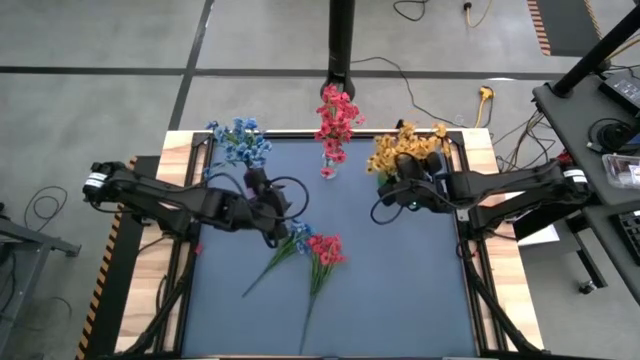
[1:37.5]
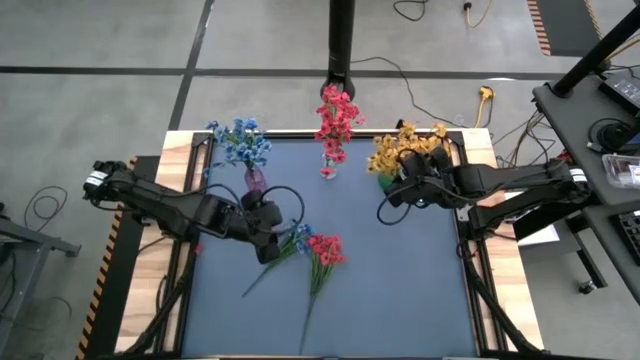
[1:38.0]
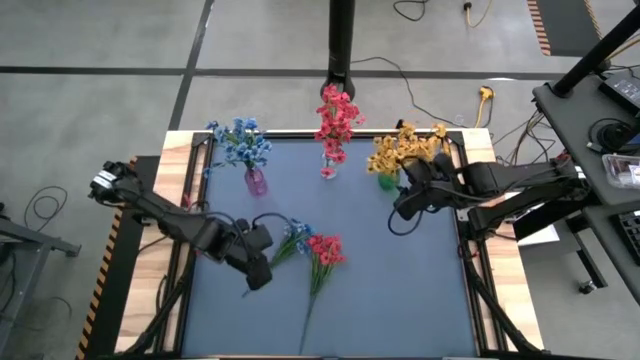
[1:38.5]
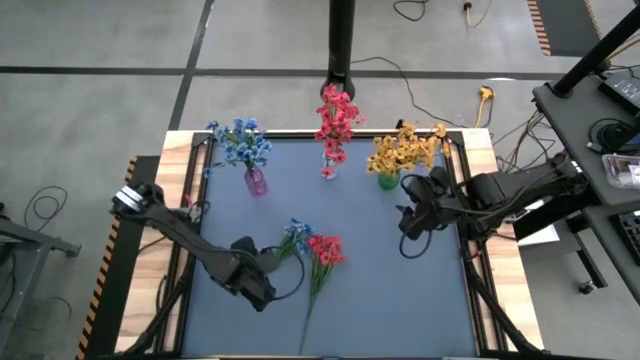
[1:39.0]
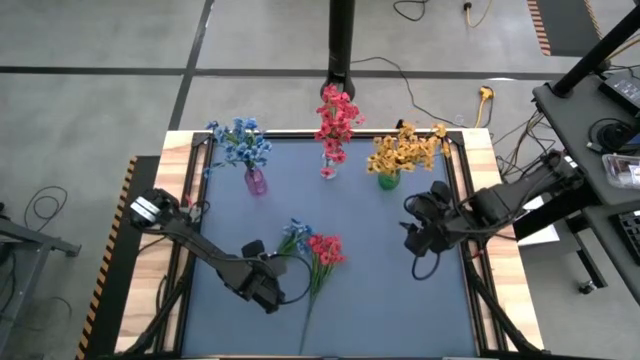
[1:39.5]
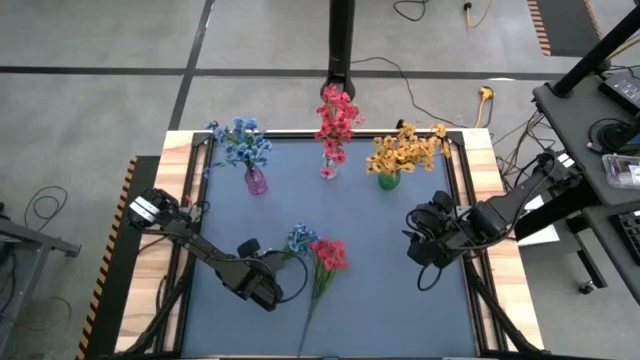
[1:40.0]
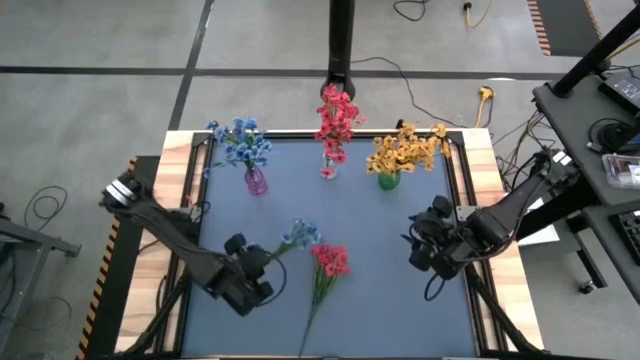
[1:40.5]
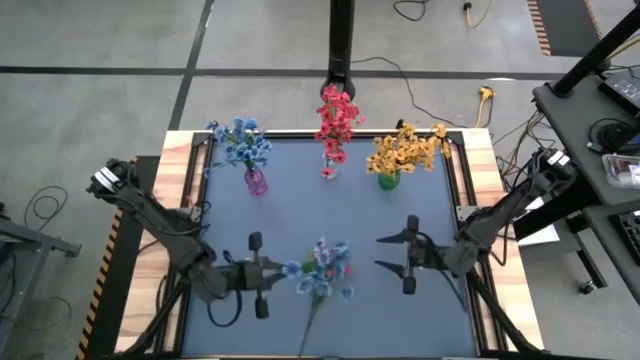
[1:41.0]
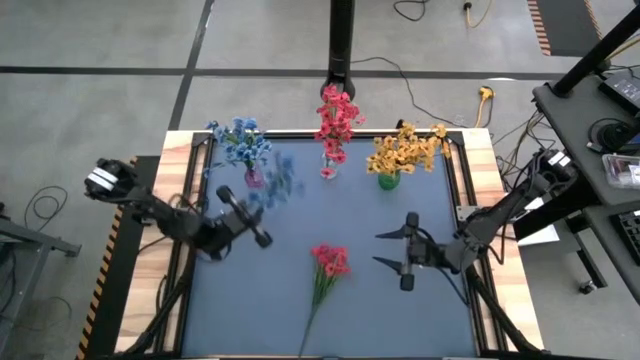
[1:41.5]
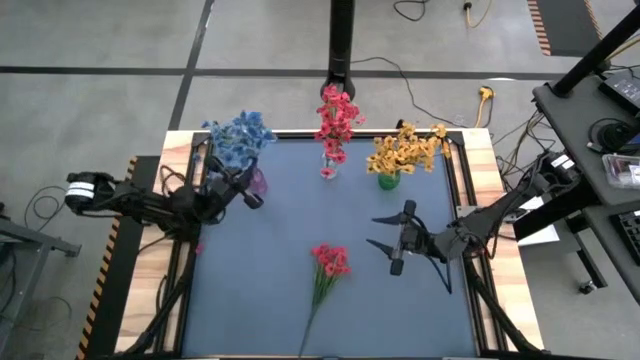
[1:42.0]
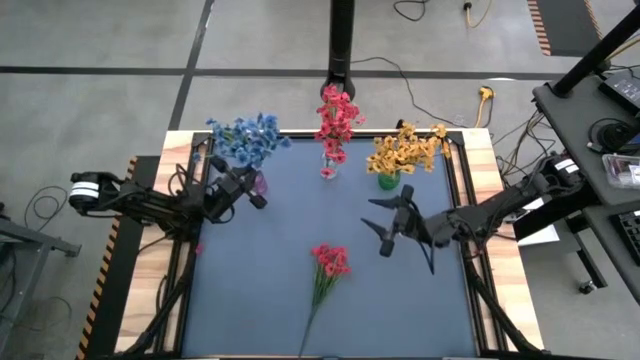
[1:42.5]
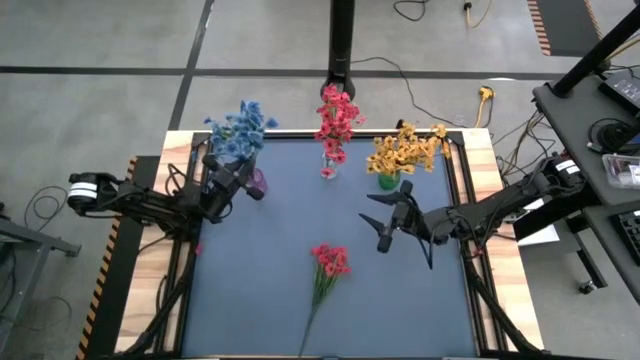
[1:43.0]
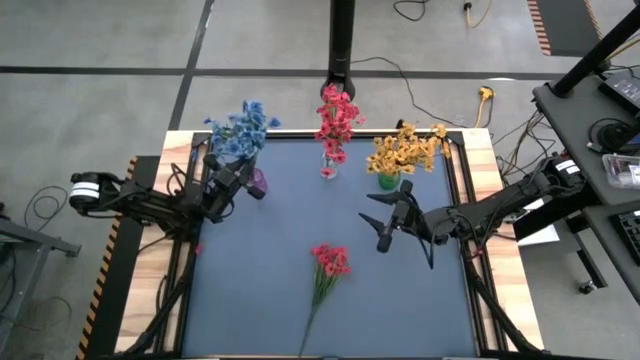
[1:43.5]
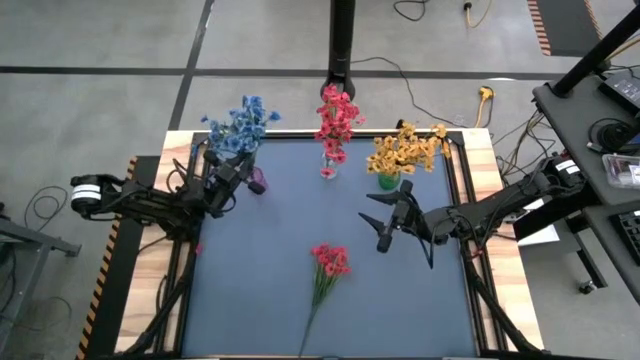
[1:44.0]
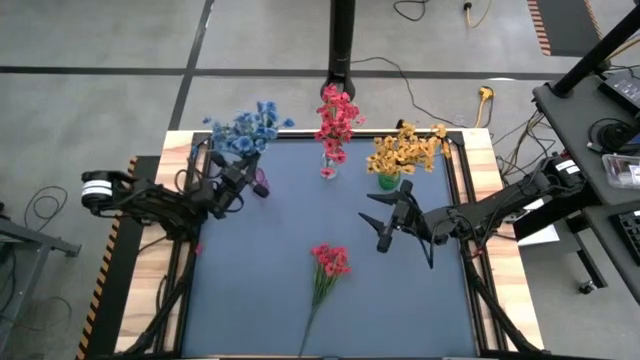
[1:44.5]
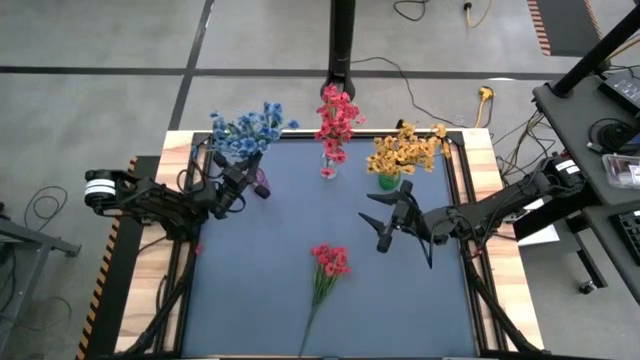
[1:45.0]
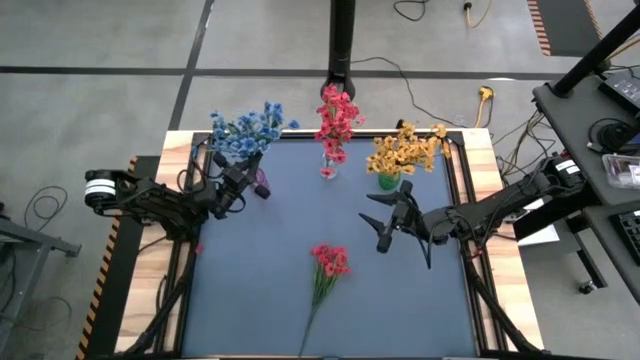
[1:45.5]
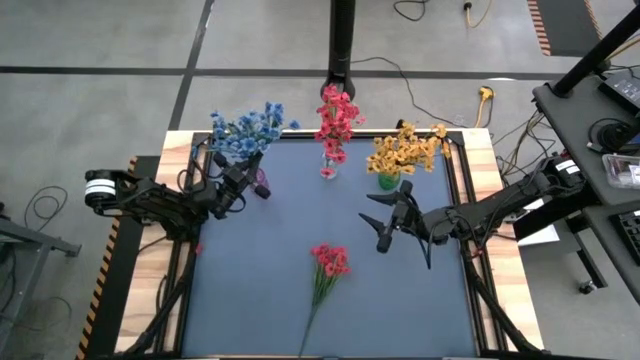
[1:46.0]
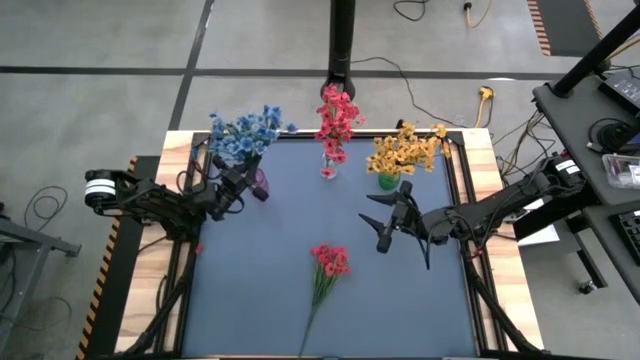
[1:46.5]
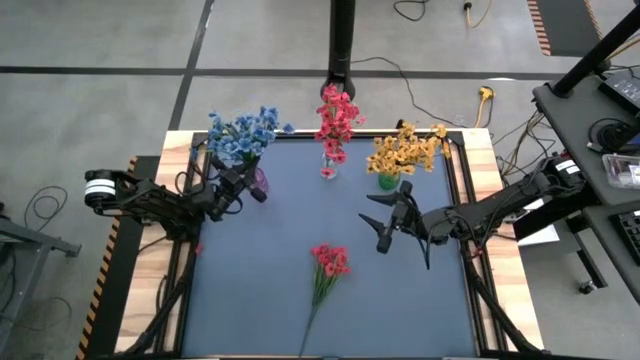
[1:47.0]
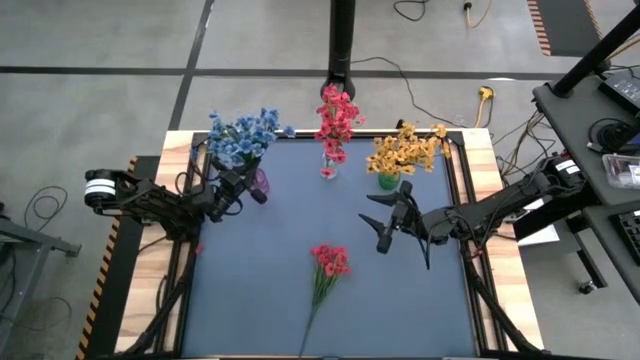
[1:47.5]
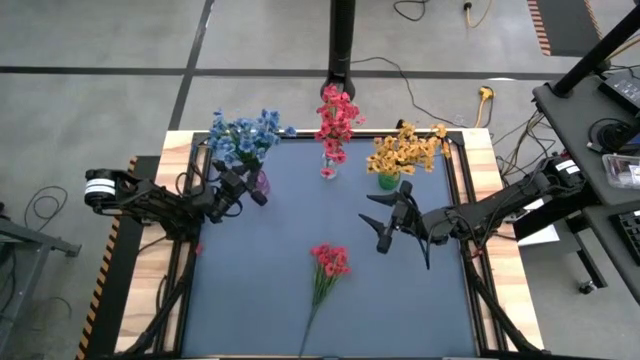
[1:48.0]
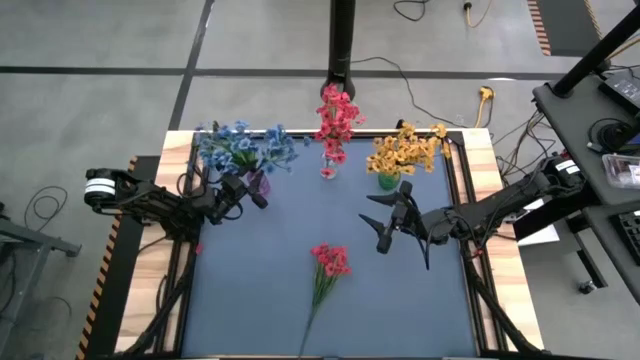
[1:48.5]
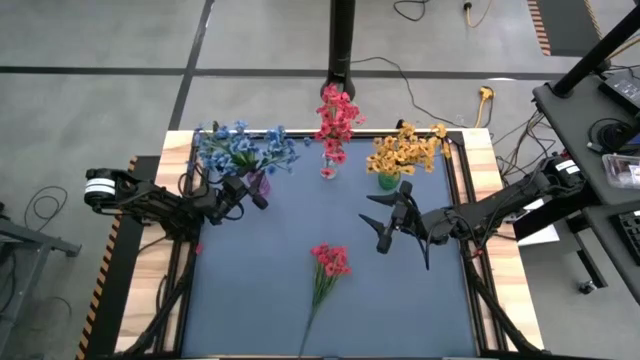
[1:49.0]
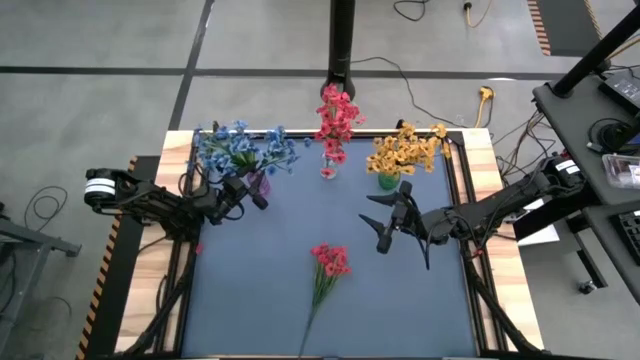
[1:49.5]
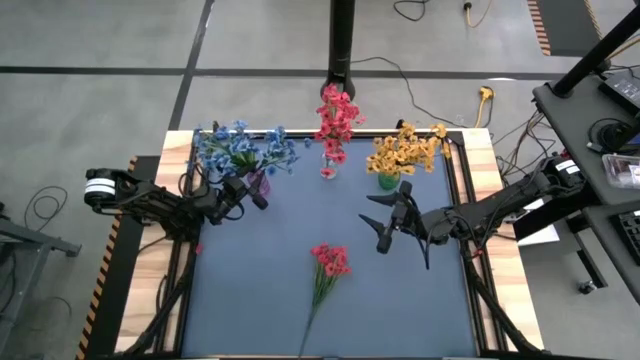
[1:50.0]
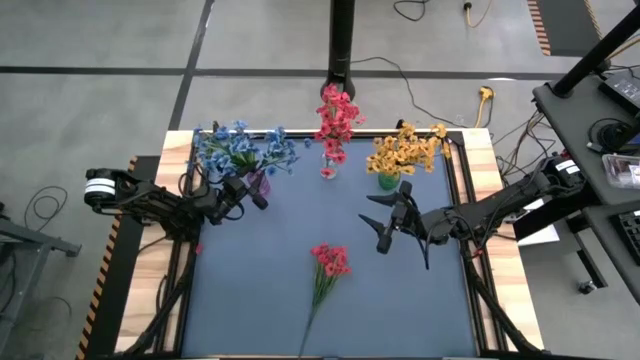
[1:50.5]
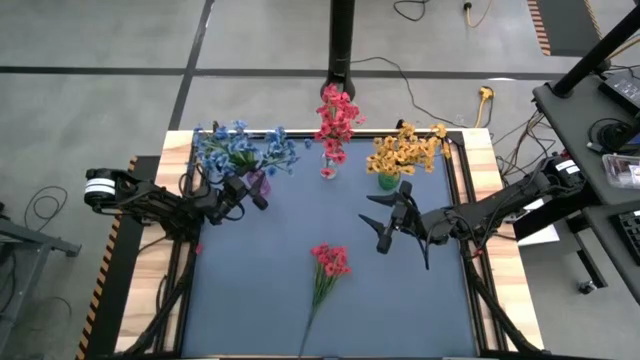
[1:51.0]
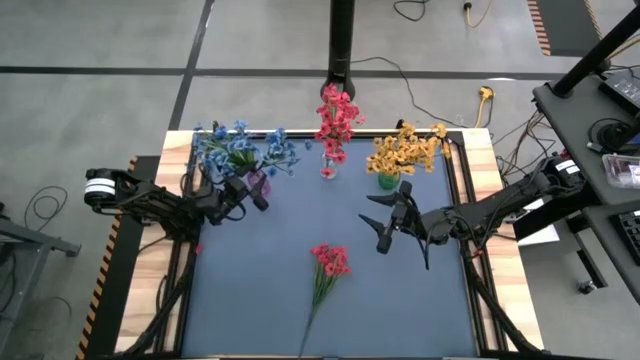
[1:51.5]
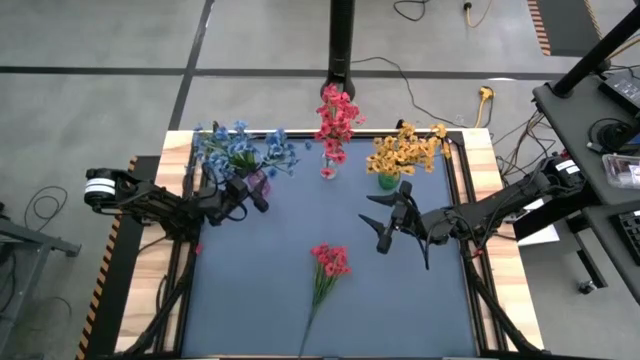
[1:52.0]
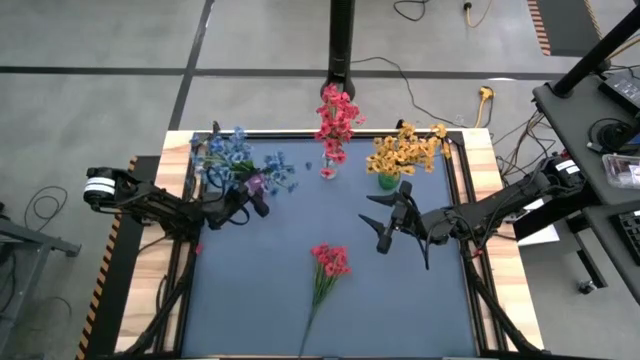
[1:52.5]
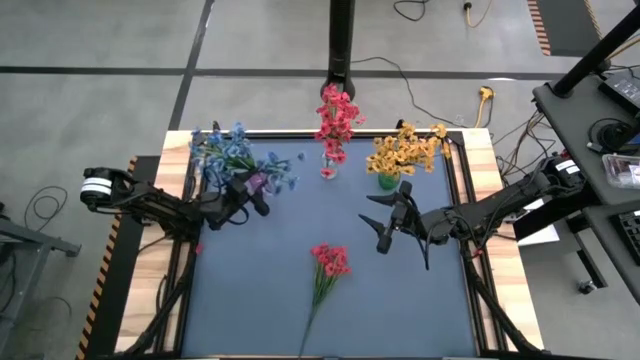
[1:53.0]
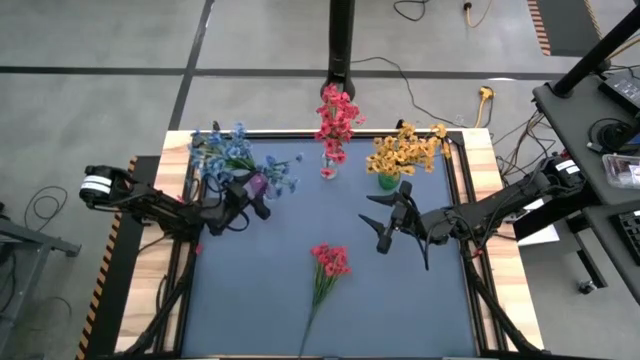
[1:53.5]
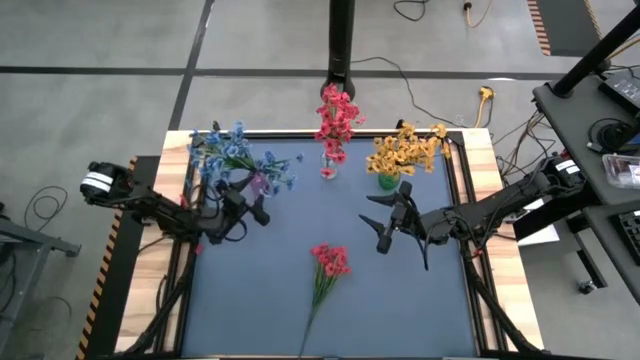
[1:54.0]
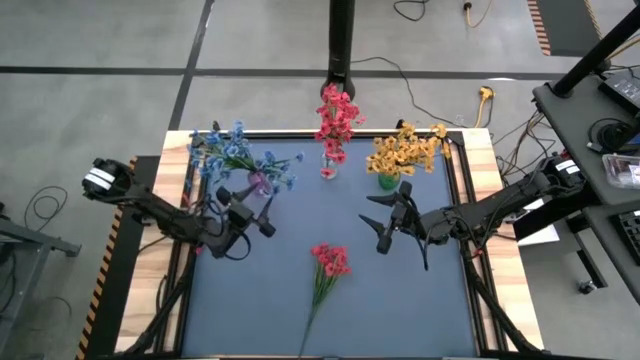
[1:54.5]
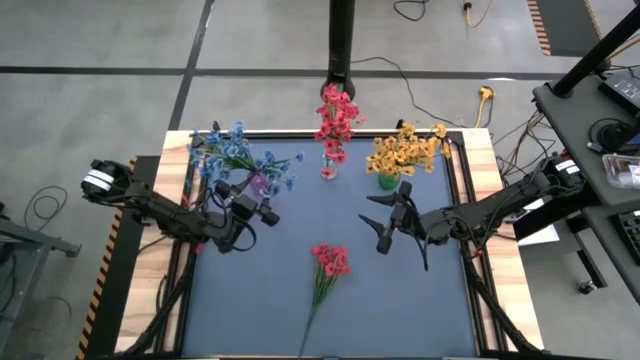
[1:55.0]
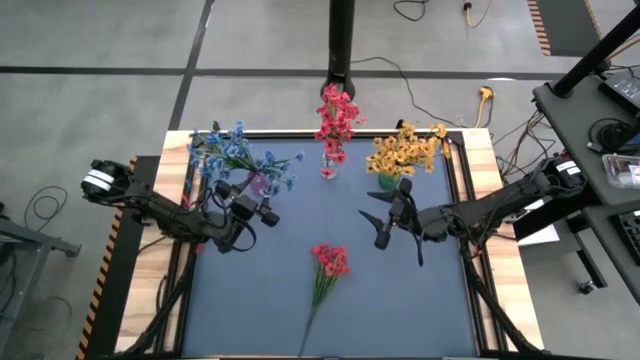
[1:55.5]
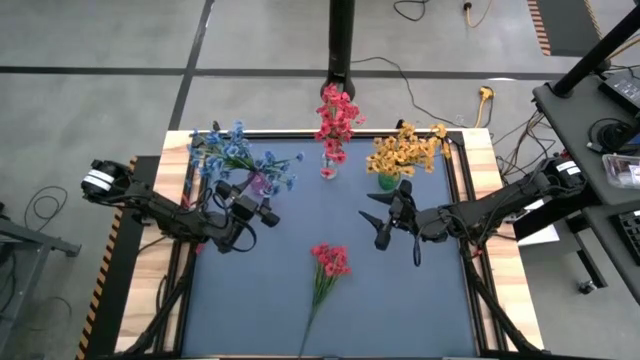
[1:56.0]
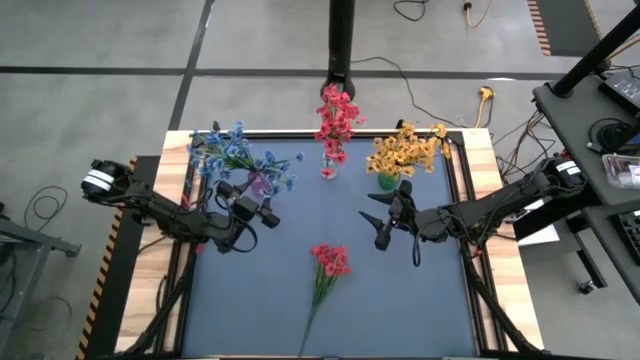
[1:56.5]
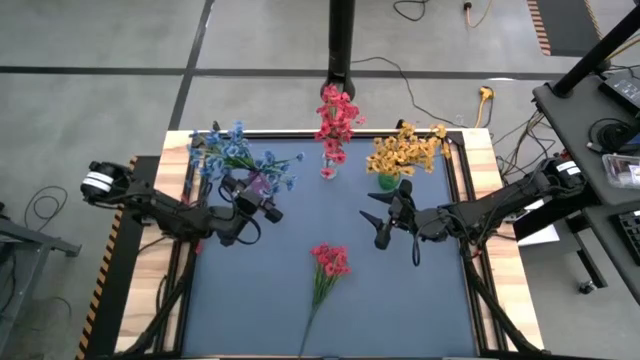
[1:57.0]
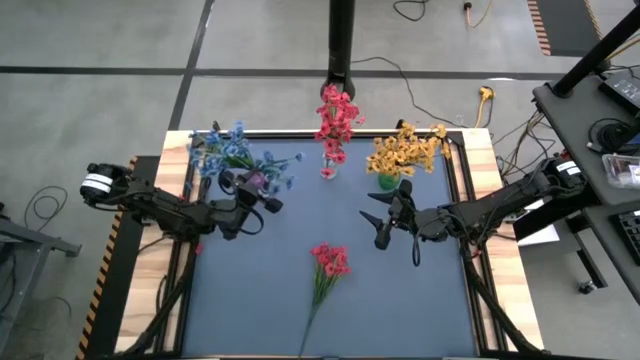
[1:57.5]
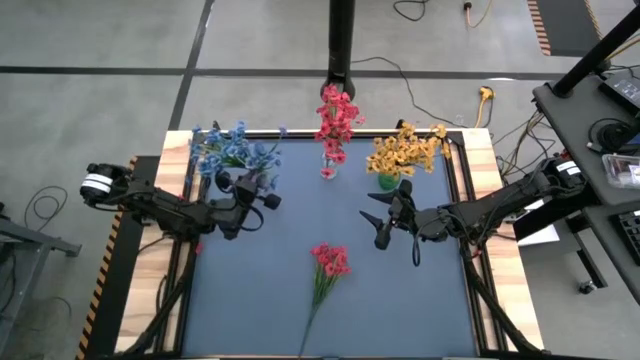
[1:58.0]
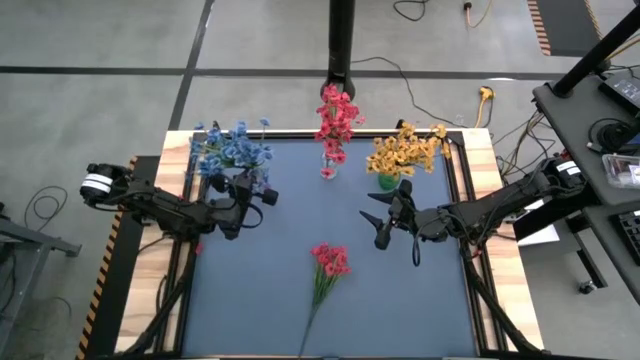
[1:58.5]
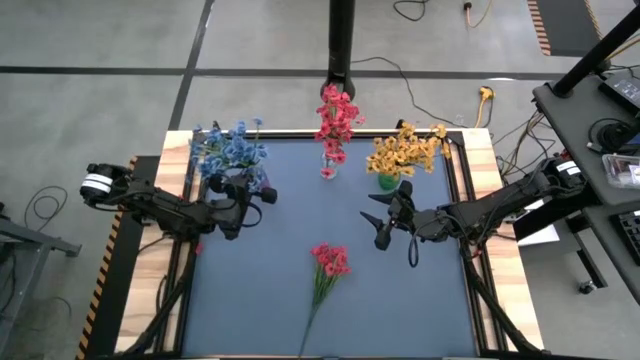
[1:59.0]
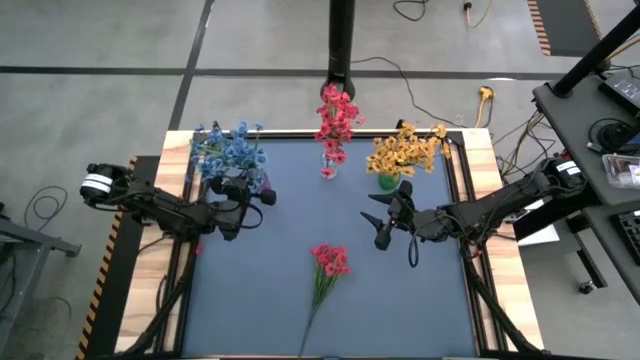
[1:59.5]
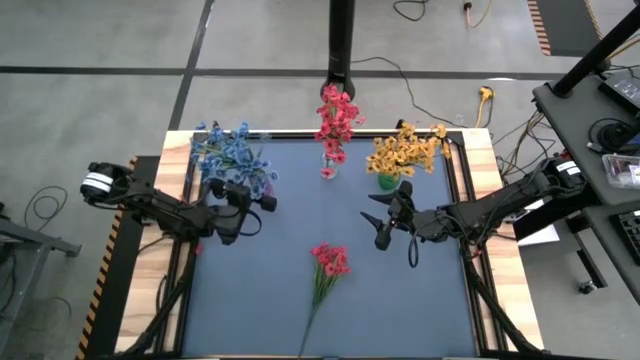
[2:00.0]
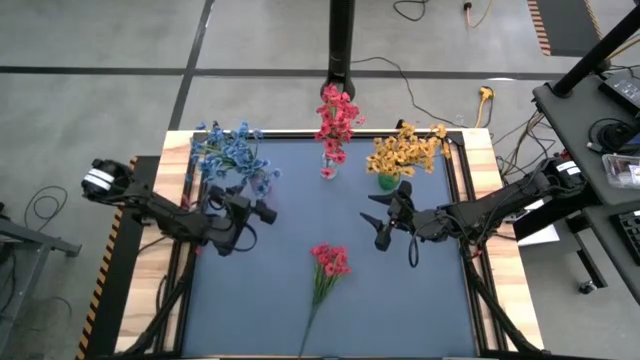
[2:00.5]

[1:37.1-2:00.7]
Task: Sort flowers into vase by color
Put the blue flower into the purple vase
